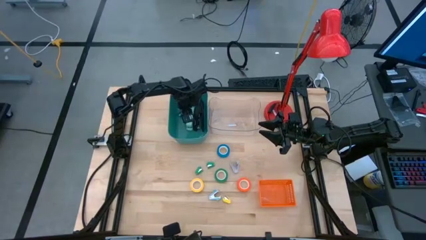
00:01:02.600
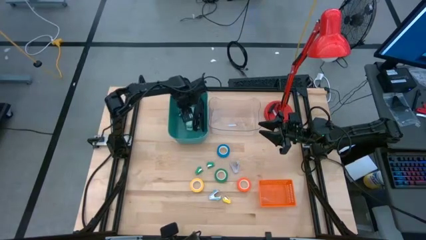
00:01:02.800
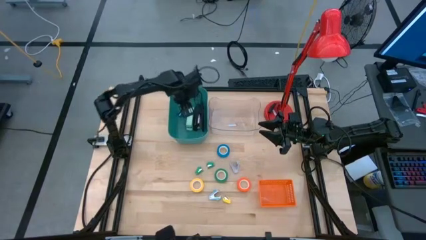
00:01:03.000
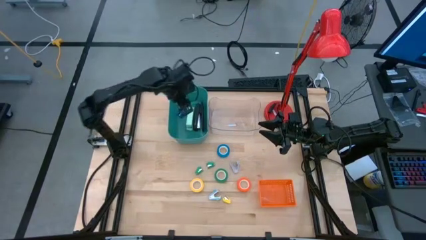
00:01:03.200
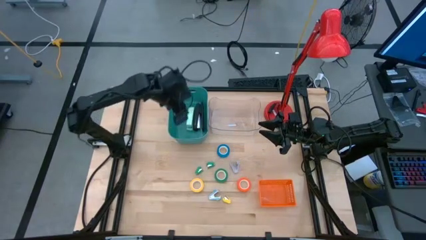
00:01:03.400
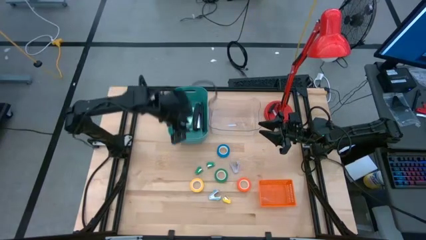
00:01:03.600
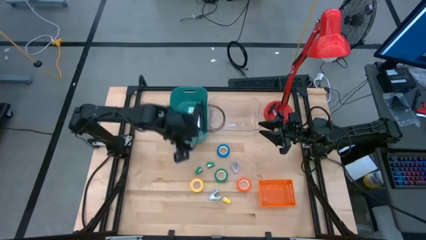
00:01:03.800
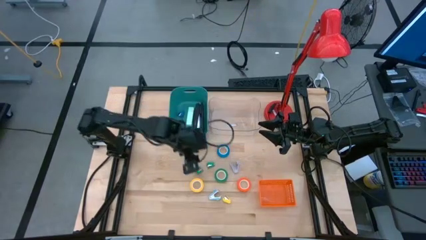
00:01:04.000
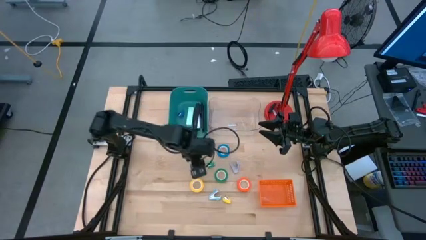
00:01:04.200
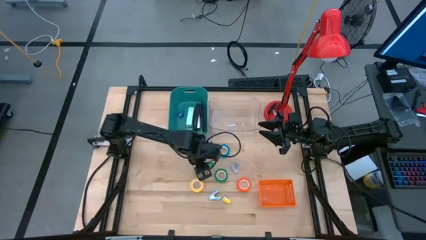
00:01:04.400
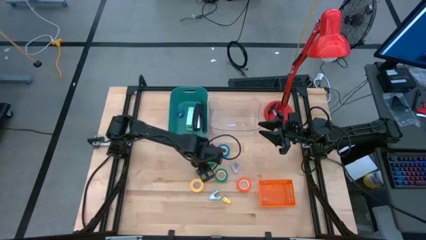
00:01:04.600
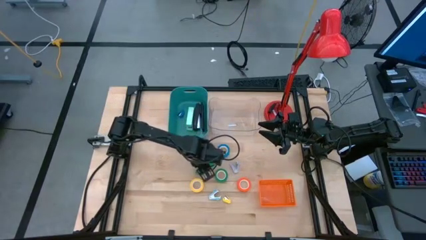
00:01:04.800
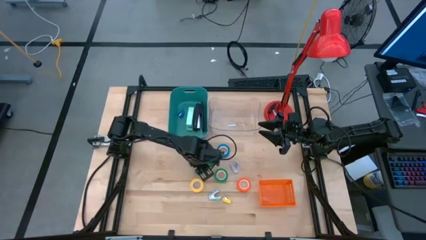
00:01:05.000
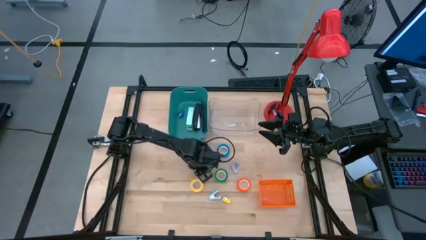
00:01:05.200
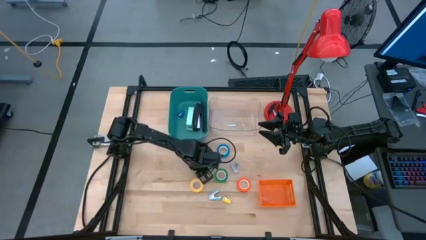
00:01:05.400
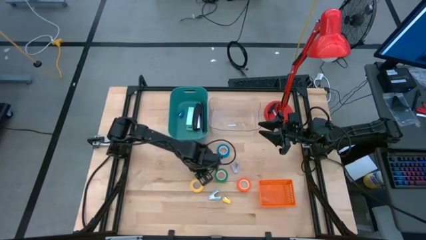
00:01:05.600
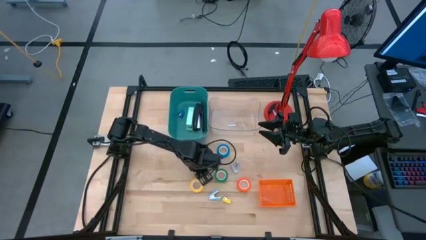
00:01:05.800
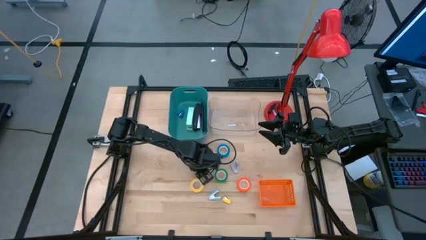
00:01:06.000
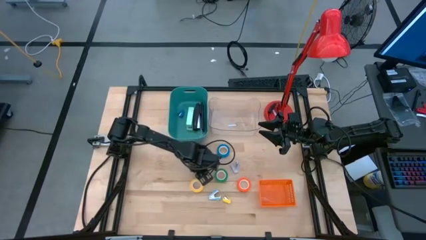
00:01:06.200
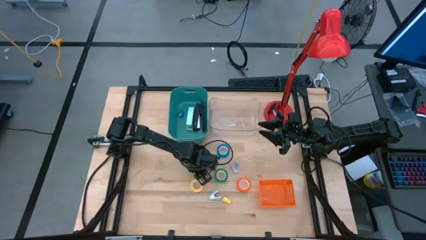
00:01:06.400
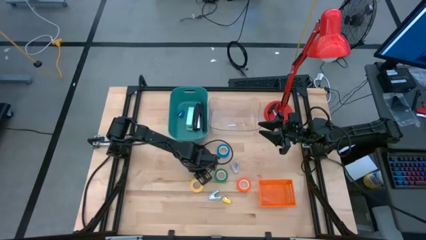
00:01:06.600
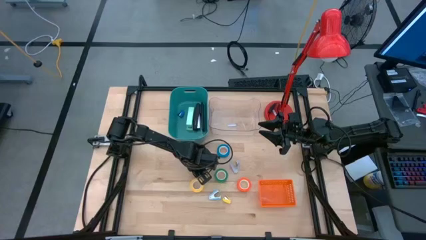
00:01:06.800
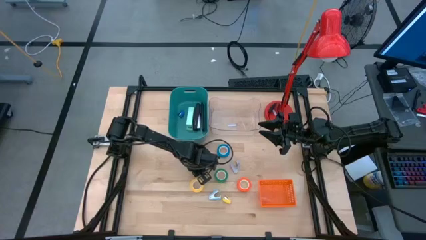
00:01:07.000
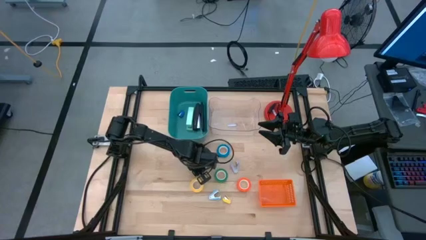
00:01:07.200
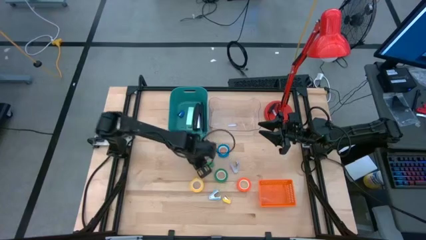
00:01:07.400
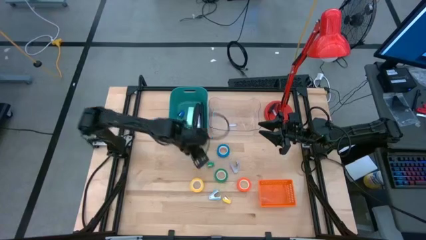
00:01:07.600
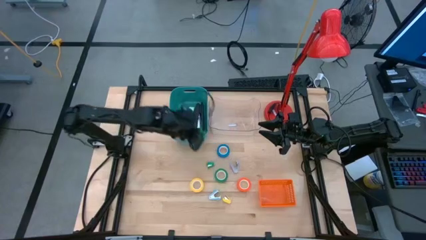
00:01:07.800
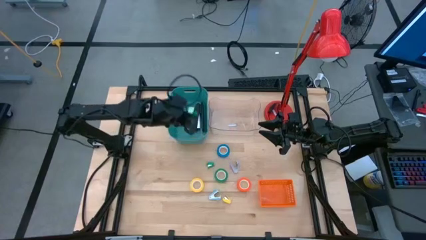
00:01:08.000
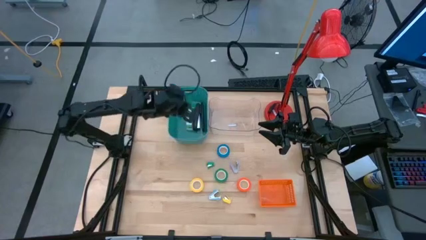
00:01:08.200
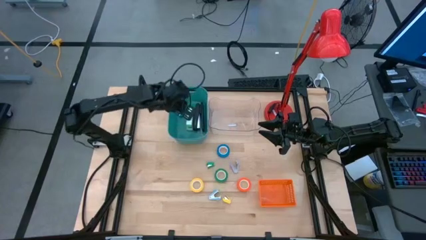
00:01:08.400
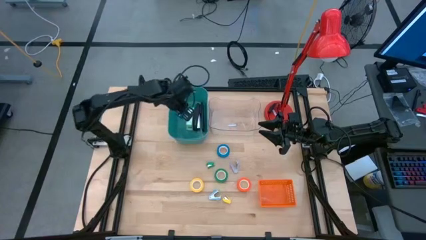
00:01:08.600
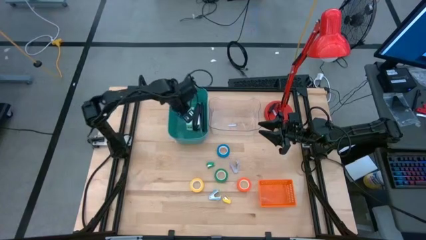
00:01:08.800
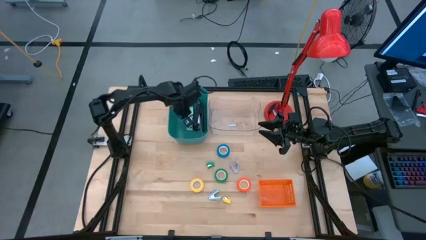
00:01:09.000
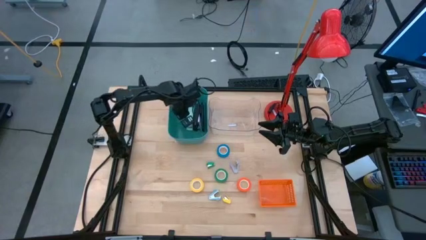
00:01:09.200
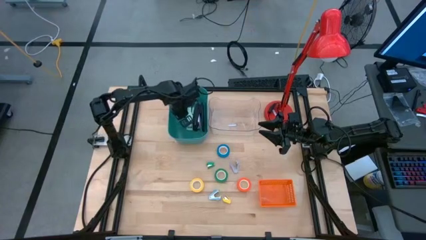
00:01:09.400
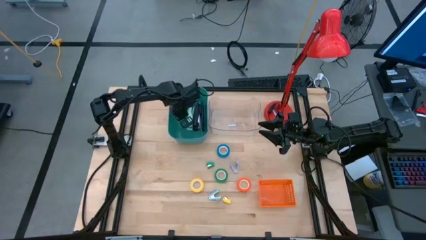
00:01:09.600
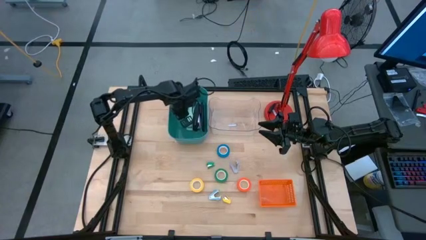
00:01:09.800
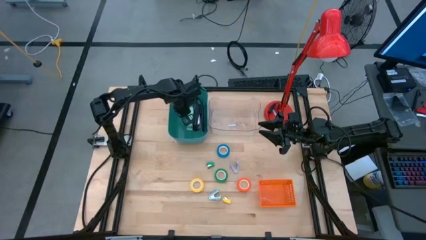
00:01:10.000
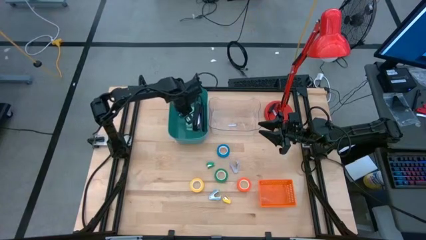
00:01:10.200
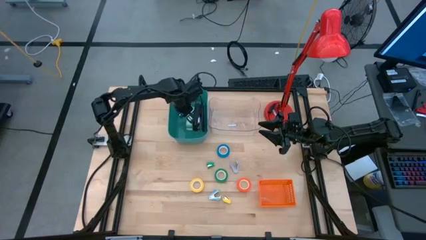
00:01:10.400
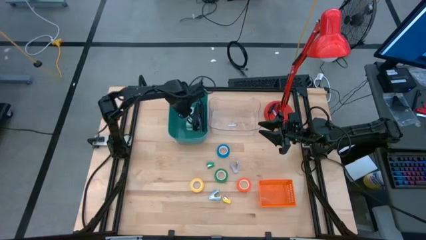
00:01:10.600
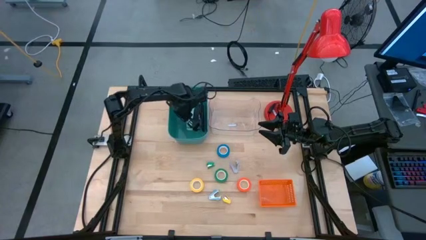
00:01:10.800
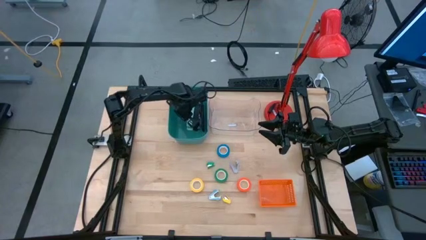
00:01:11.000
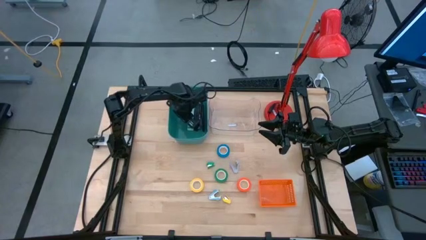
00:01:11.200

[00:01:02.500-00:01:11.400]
Task: Pick and place Stapler, Stapler remover, tape
Put the left small green stapler into the blue bin
